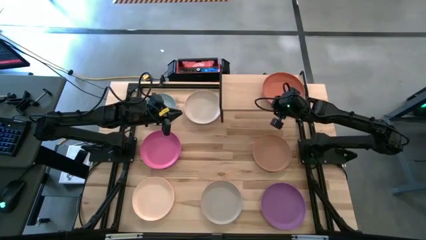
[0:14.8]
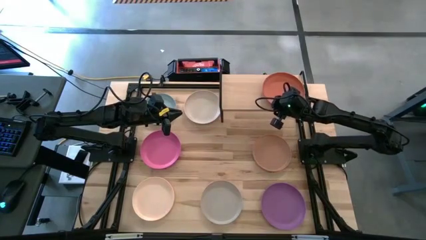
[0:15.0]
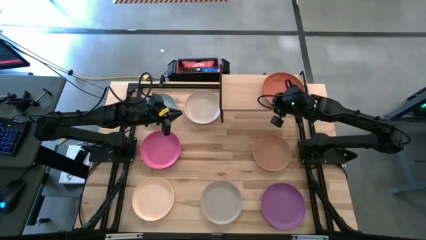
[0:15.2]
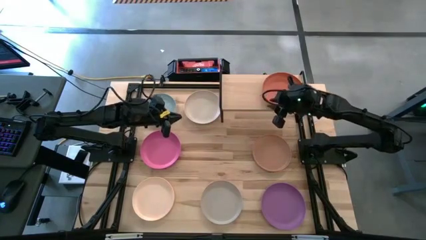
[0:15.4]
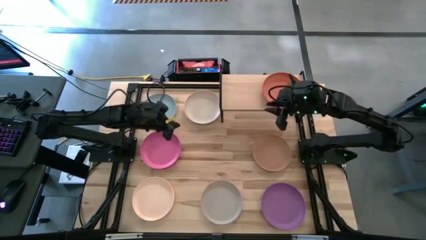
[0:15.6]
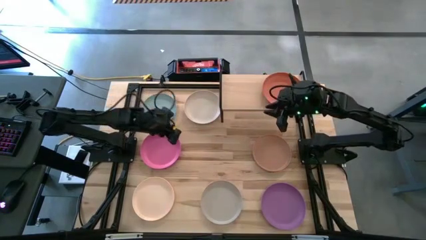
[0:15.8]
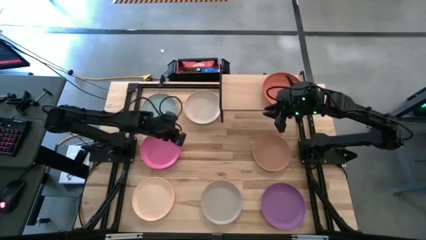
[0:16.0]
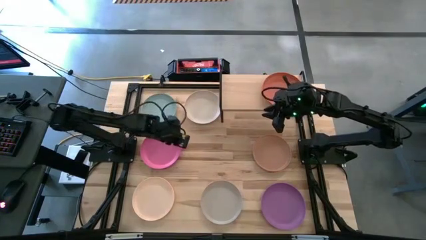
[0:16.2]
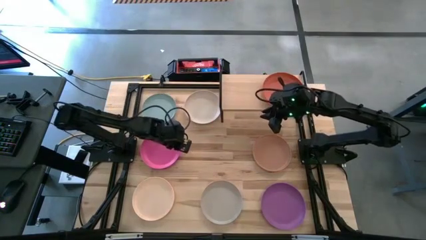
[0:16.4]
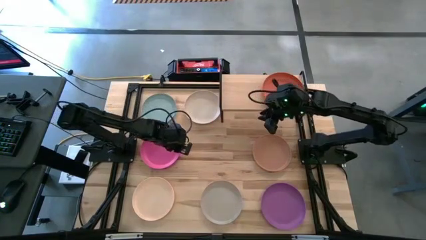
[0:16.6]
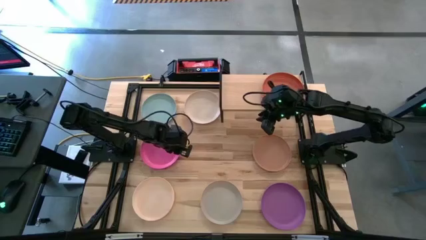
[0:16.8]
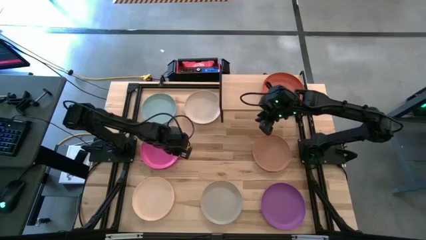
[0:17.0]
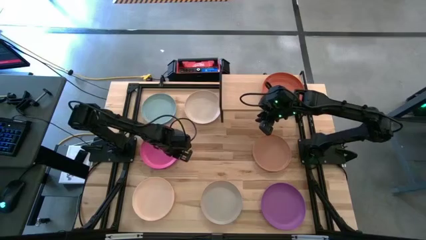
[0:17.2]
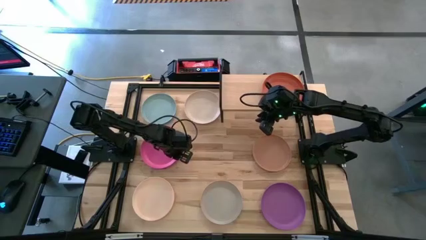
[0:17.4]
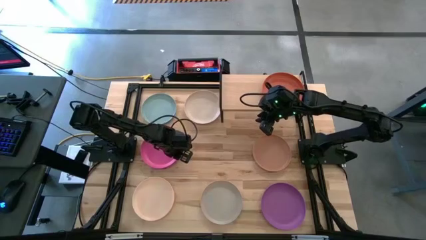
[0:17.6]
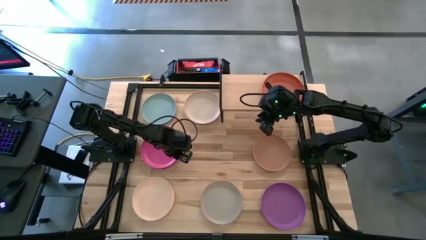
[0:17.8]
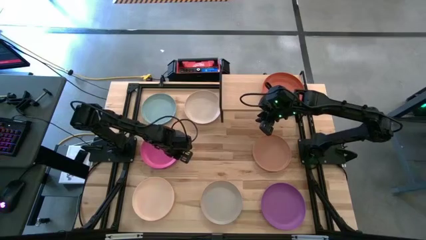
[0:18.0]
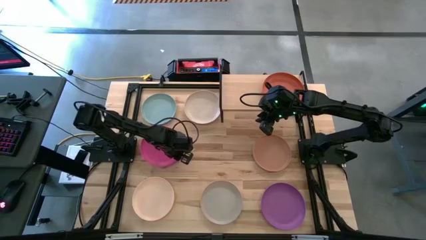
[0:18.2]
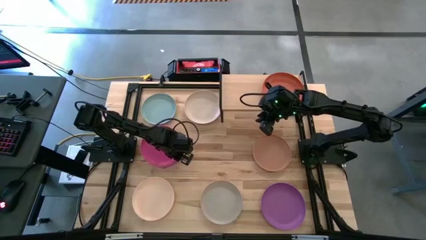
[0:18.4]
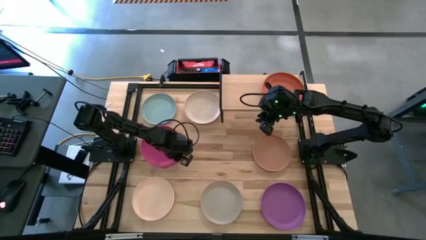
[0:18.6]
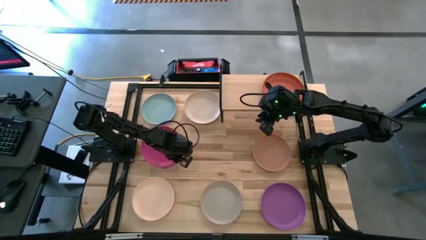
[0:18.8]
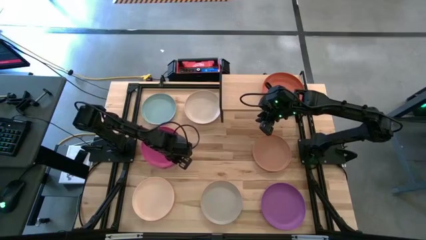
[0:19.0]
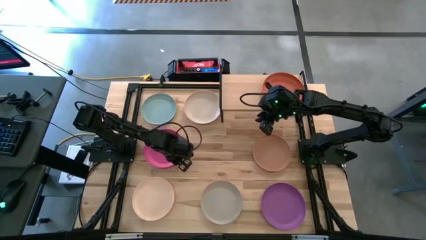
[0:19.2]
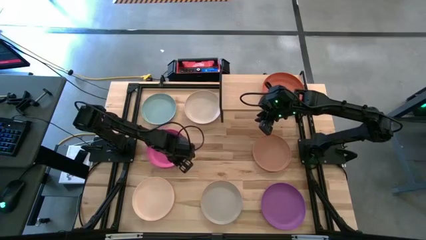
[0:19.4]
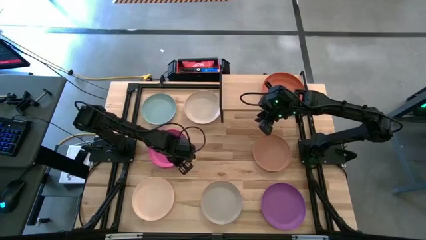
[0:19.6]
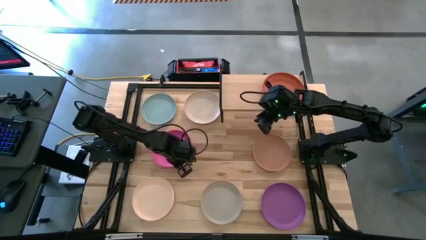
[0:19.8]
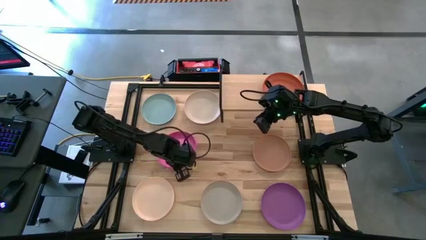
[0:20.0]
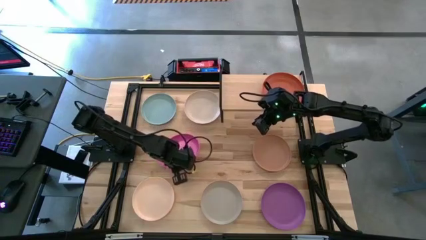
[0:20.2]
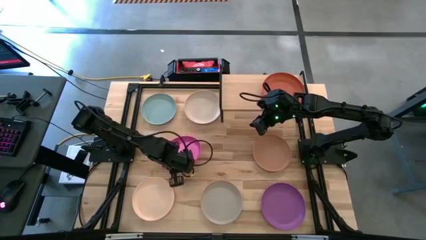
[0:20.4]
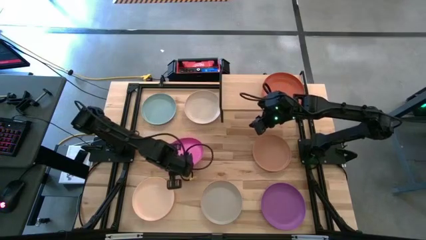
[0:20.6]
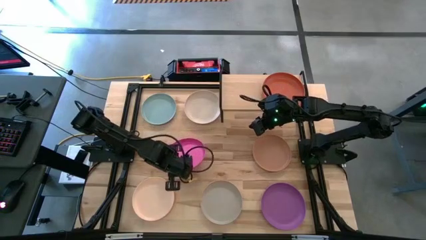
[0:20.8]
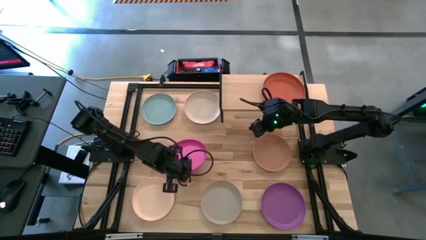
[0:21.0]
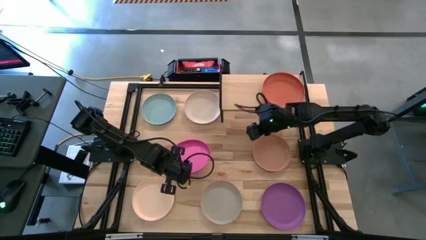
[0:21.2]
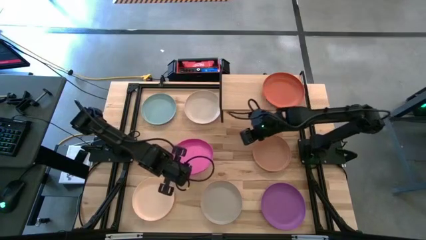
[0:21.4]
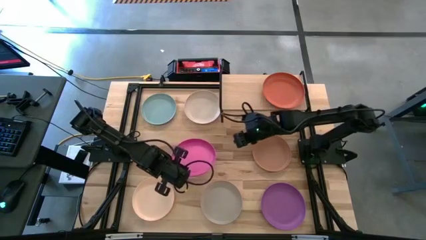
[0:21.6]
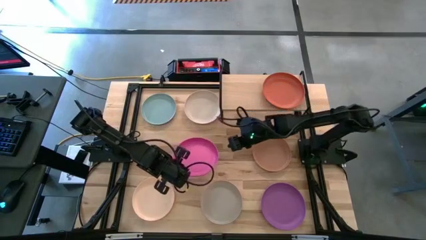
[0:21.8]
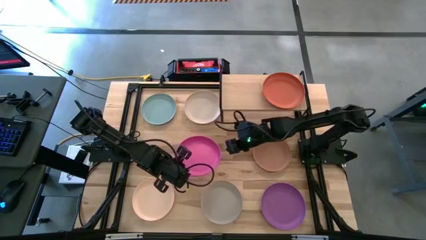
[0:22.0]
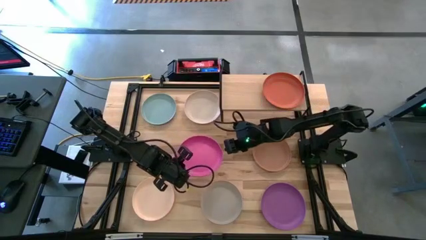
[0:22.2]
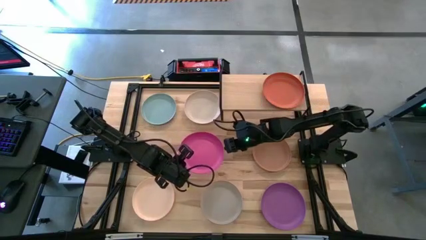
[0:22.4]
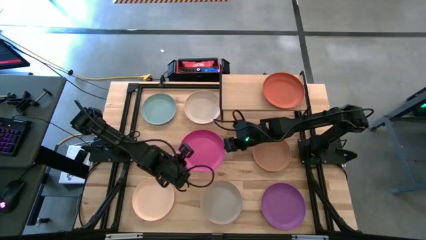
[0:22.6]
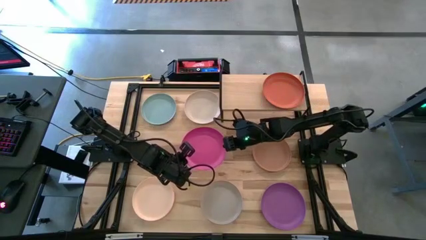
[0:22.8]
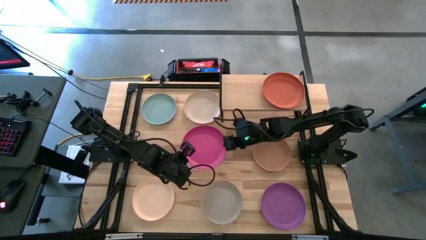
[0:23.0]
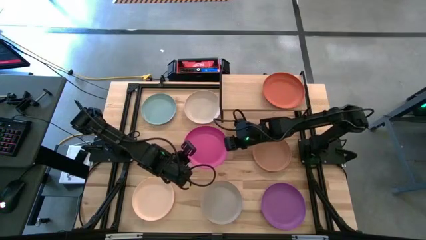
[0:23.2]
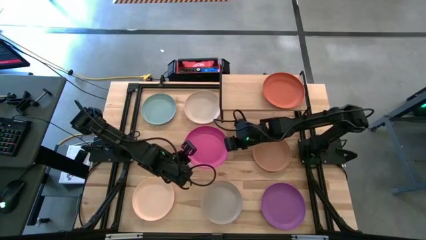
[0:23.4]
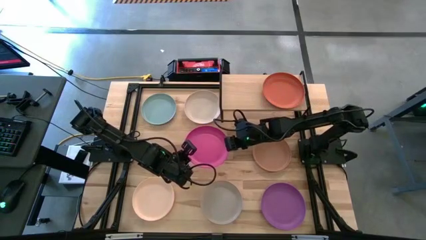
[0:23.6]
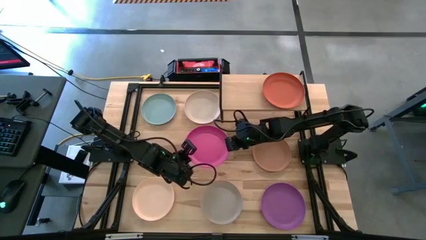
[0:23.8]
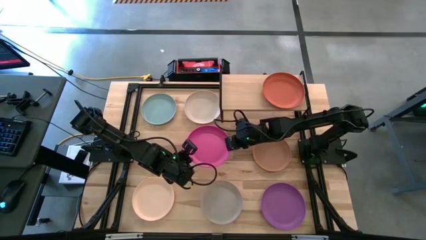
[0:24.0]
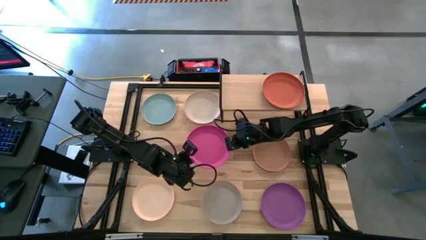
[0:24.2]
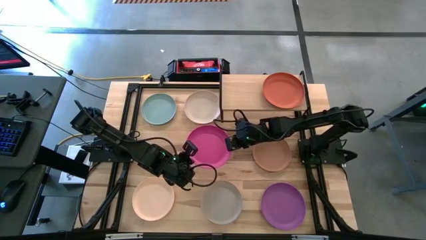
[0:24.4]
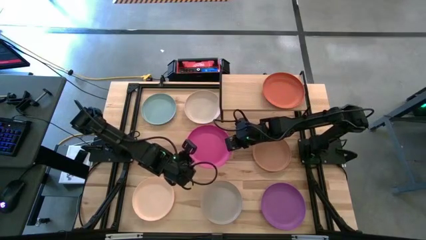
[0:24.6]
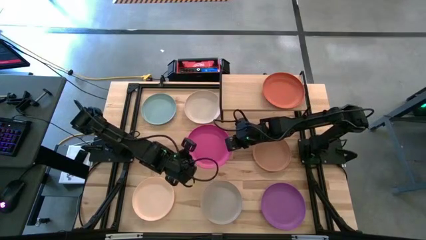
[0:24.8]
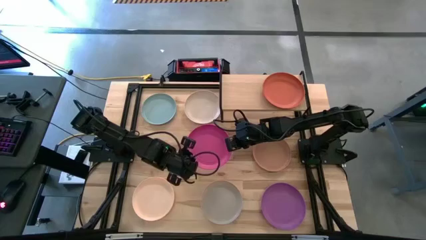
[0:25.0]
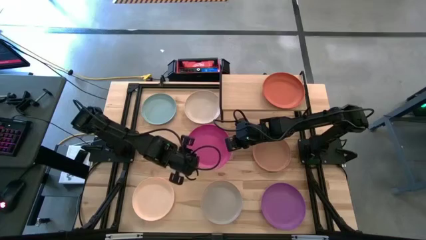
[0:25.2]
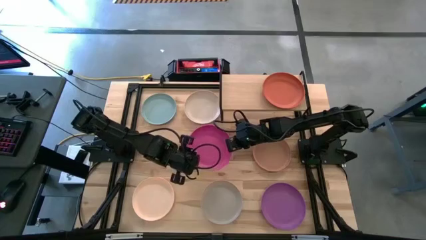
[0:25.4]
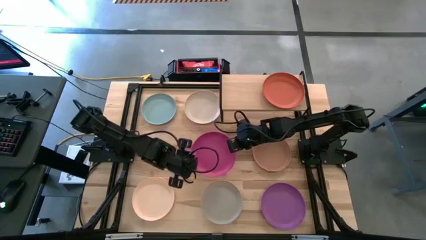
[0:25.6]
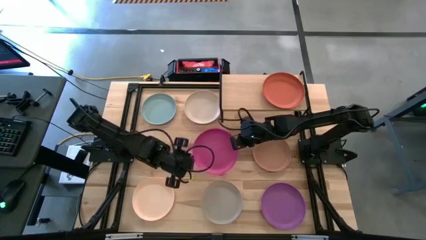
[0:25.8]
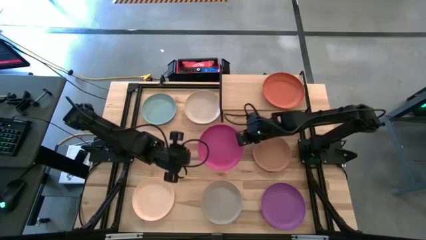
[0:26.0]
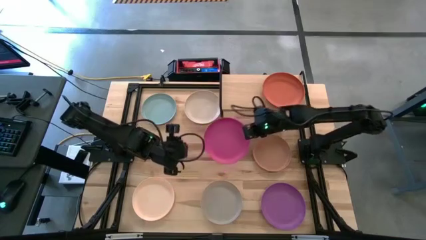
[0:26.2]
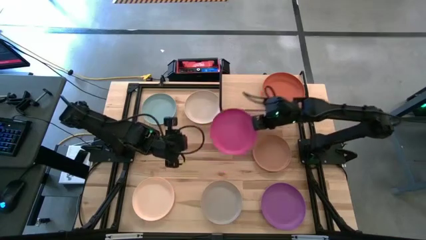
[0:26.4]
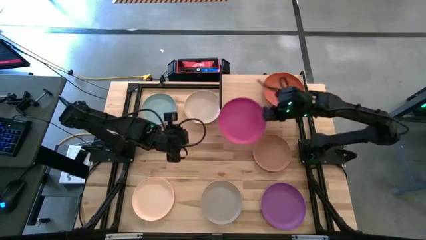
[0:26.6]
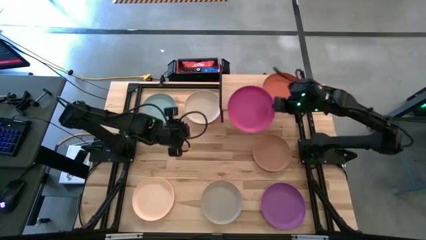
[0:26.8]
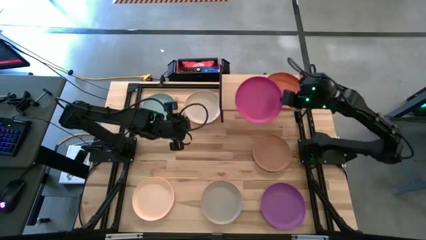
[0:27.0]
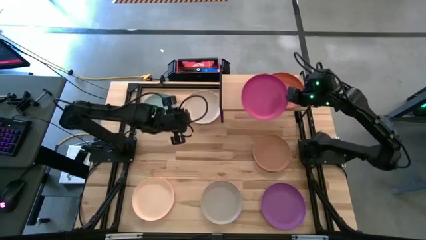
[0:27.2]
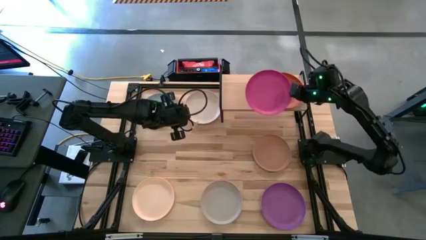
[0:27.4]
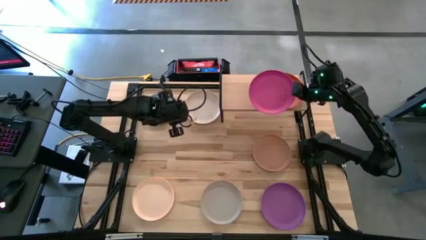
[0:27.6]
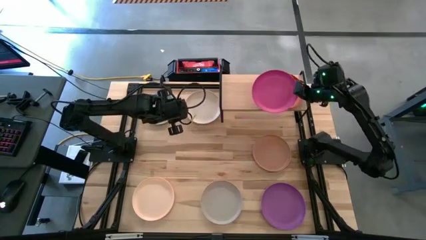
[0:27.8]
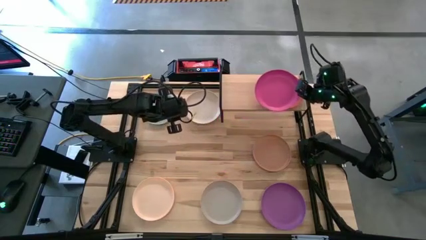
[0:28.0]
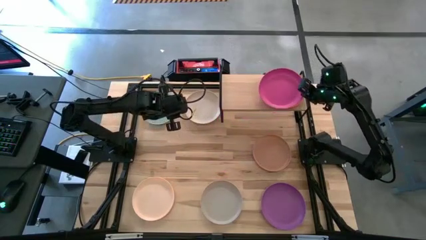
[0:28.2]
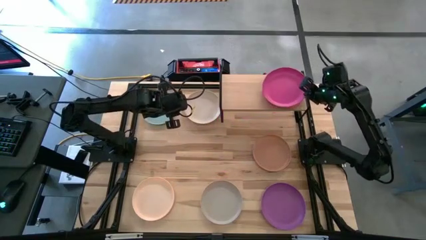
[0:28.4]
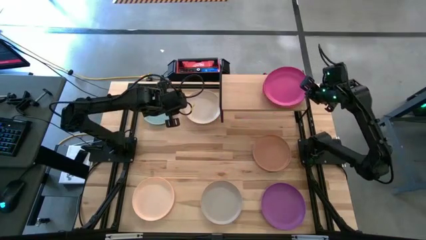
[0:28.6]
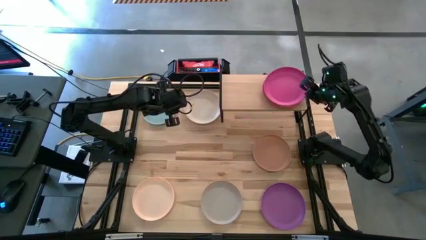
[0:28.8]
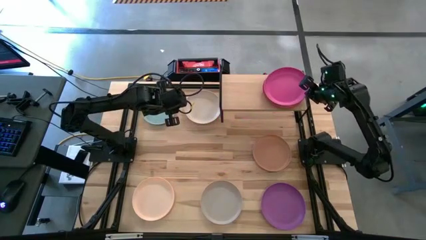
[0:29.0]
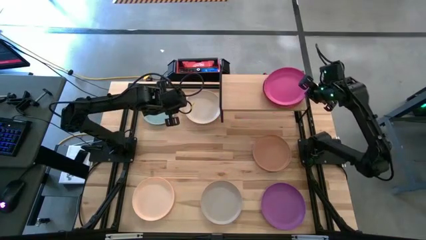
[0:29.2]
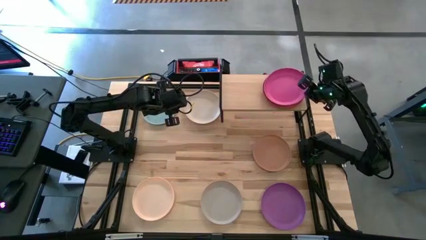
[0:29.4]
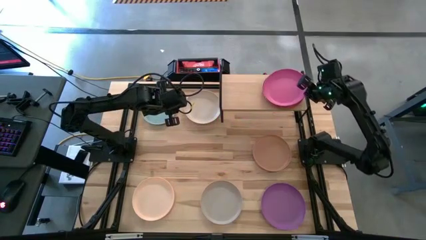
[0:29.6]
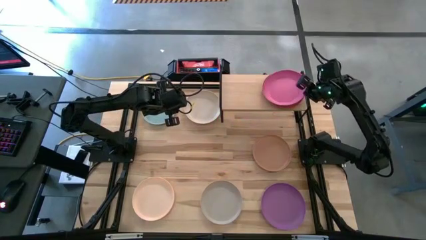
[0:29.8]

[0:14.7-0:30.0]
Task: Place and stack plates onto a shelf
Stack the pink plate on top of the orange plate on the shelf
